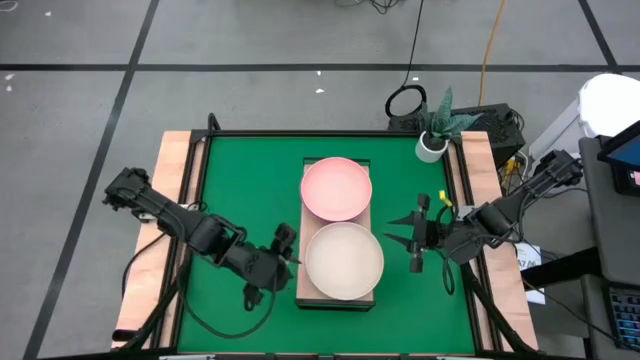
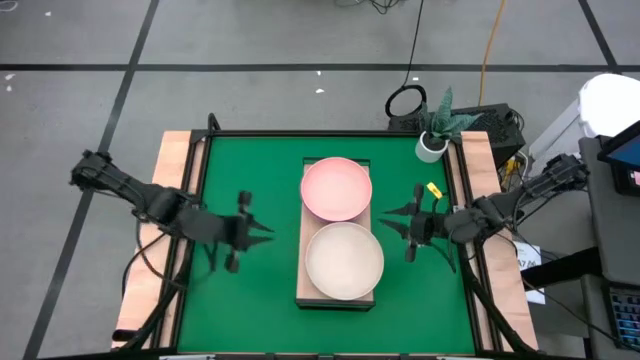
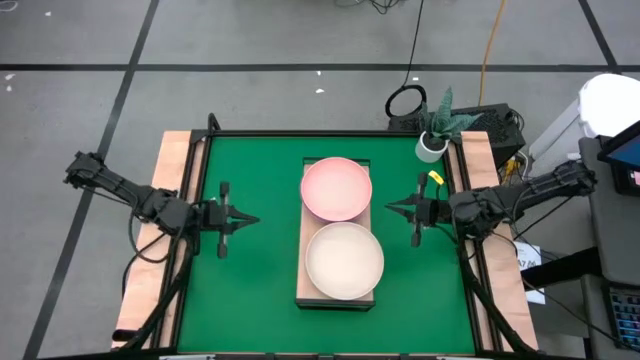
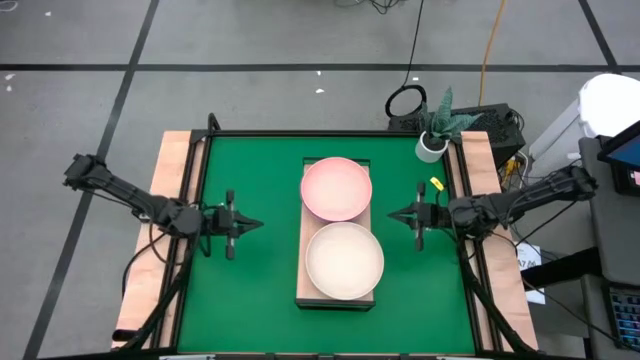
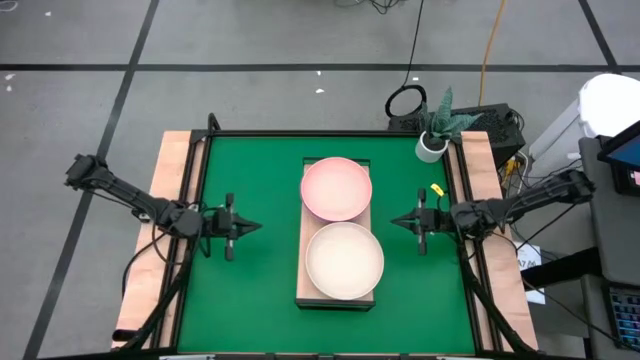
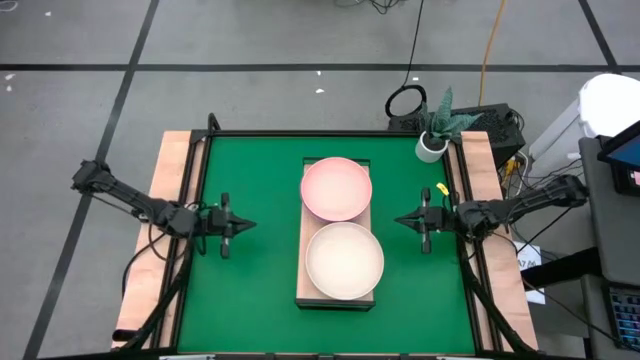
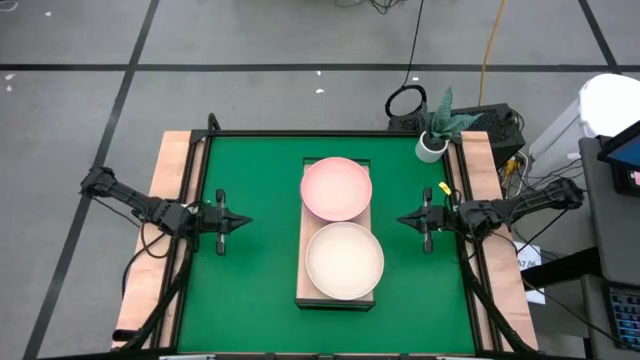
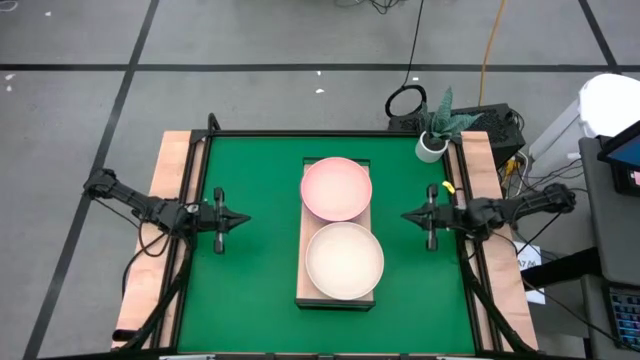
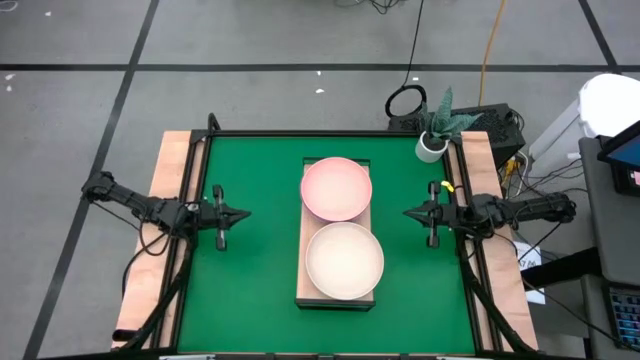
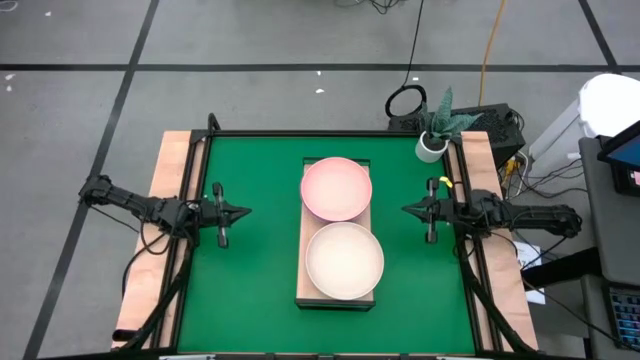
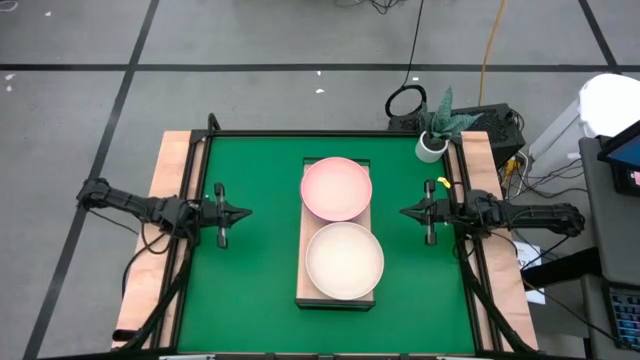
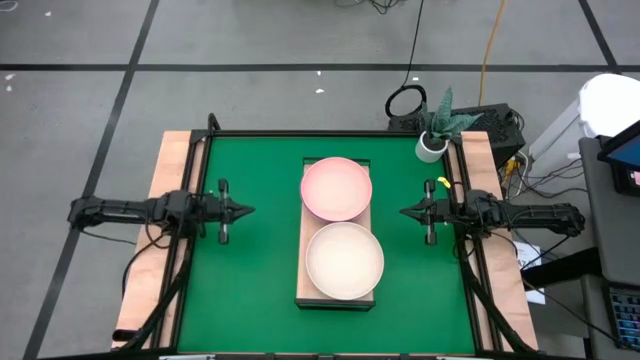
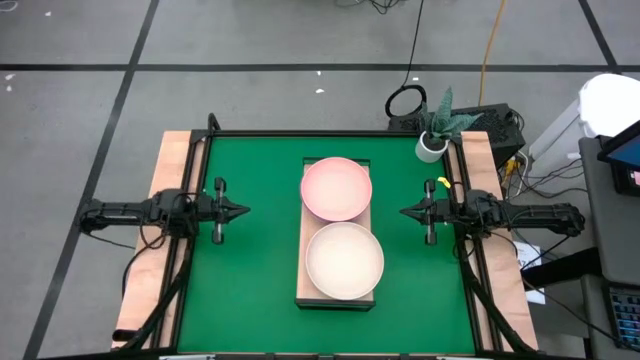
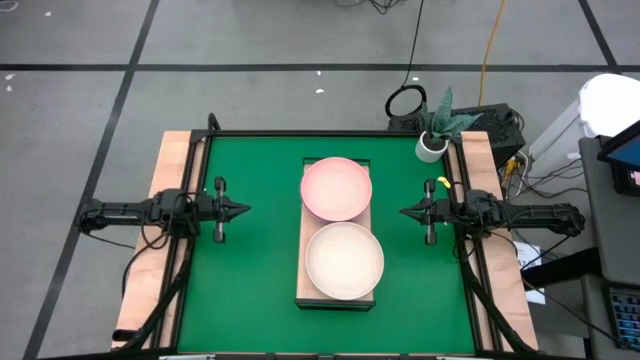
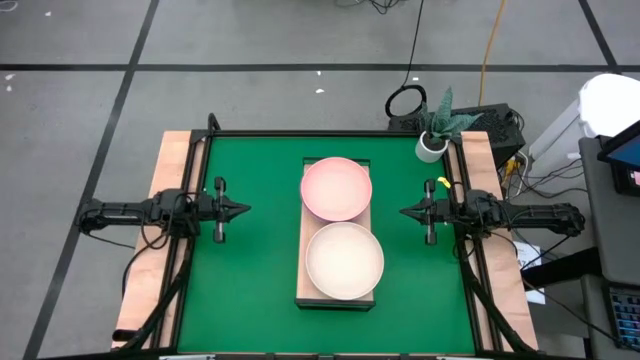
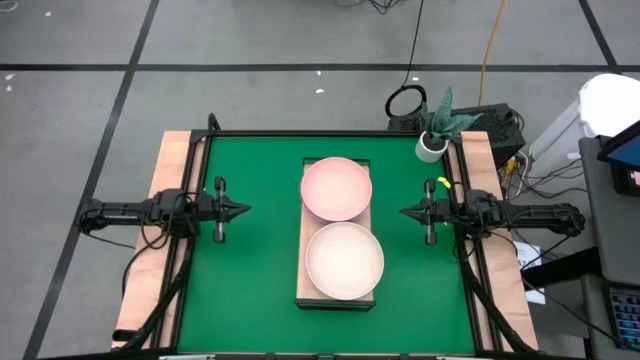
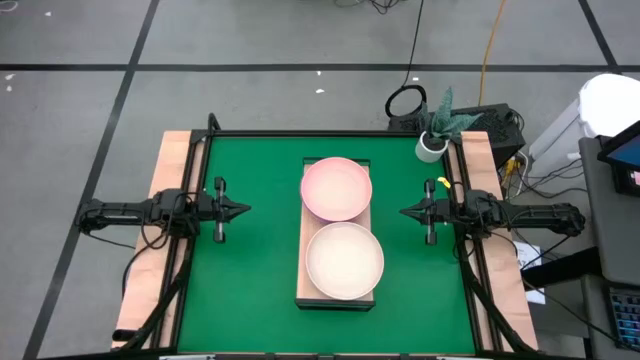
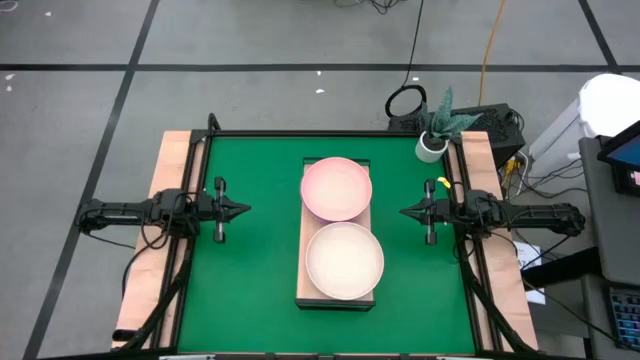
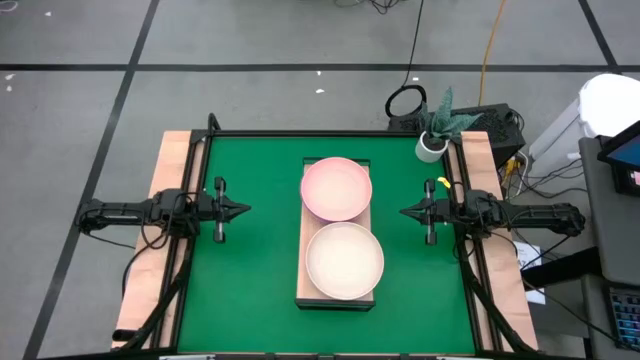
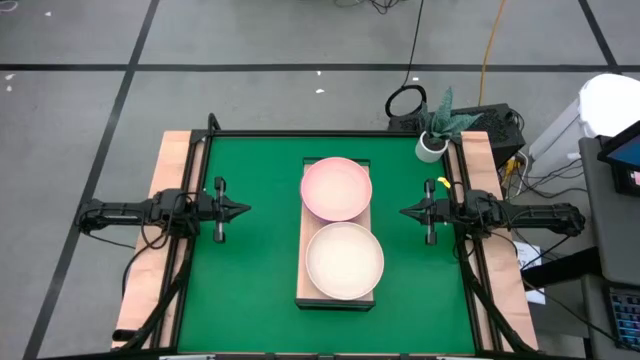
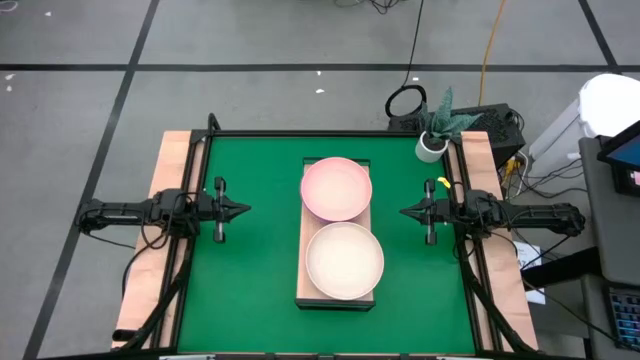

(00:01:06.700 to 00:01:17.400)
Task: Place and stack plates onto a shelf
Return to Home Position

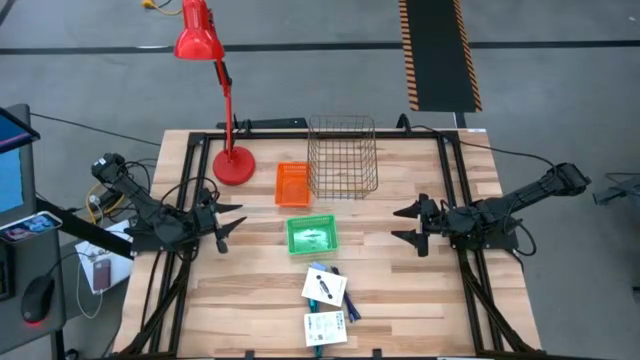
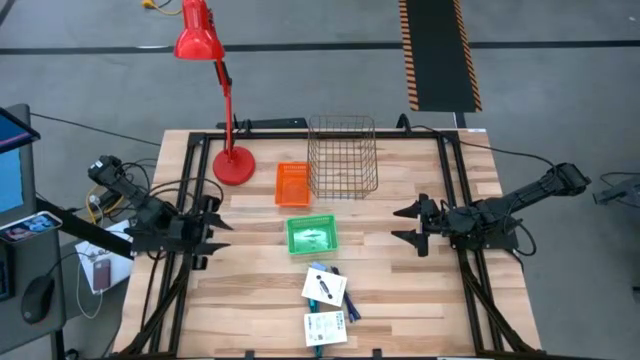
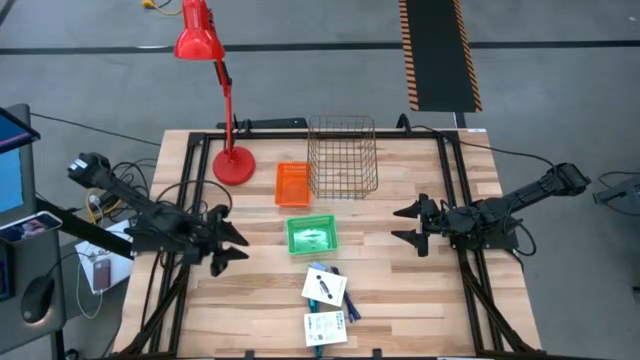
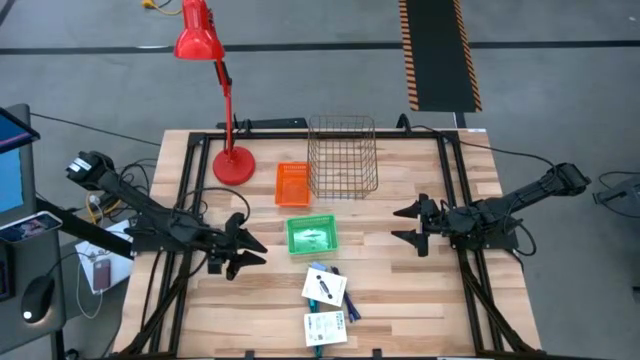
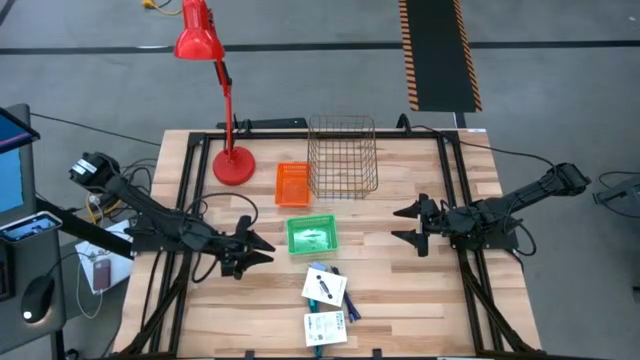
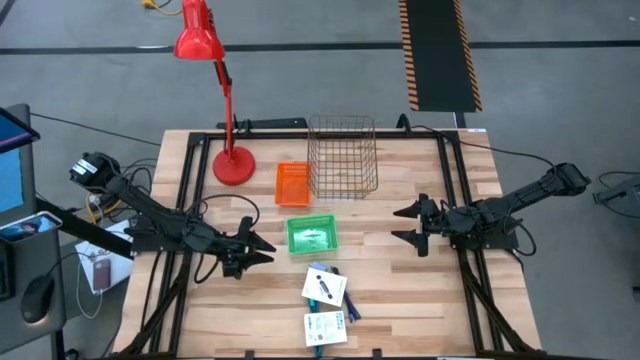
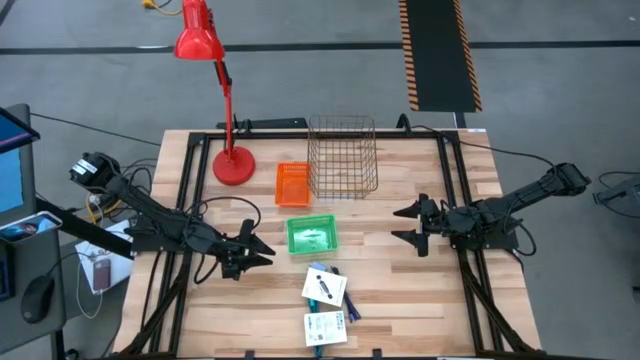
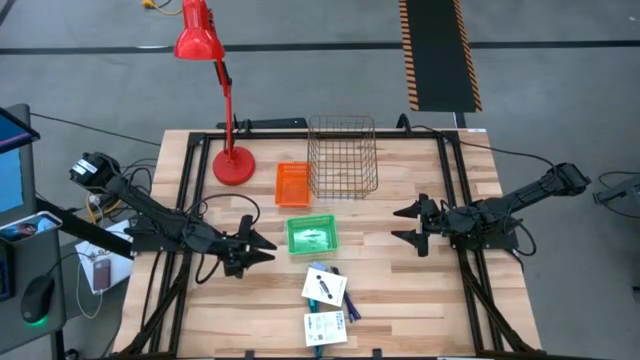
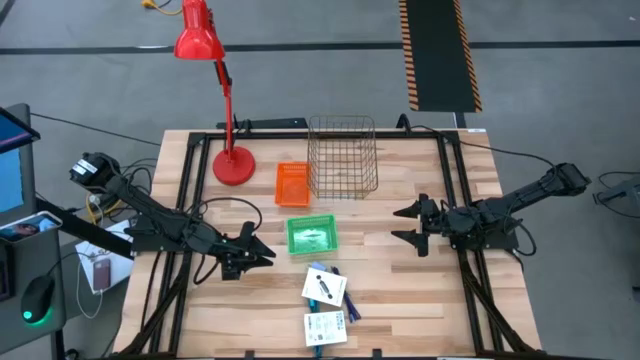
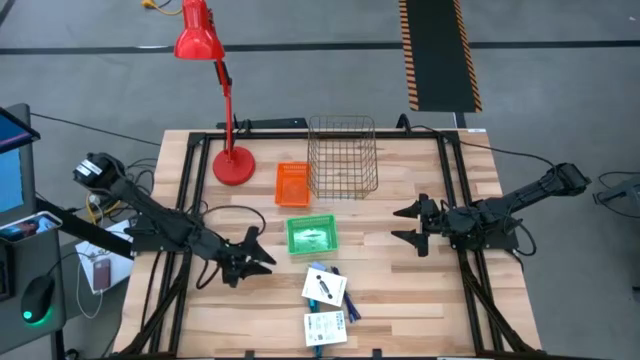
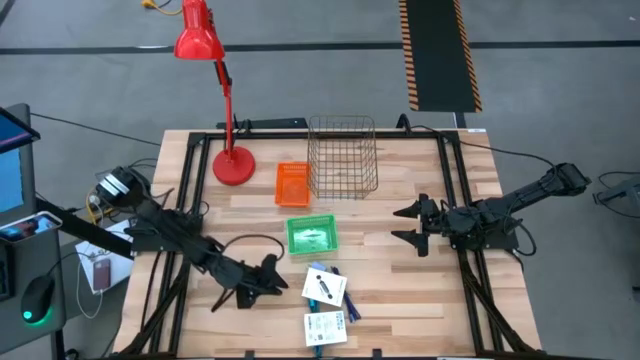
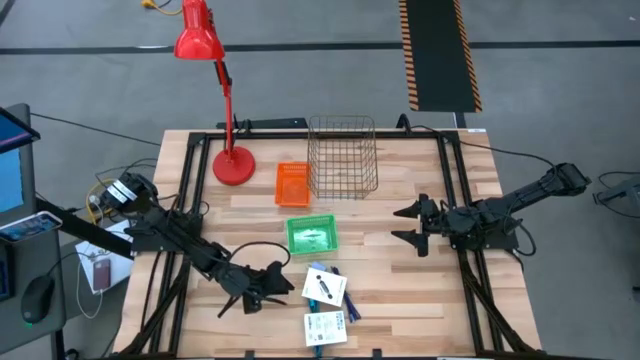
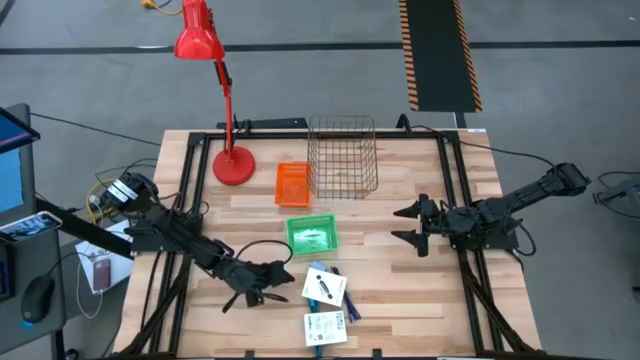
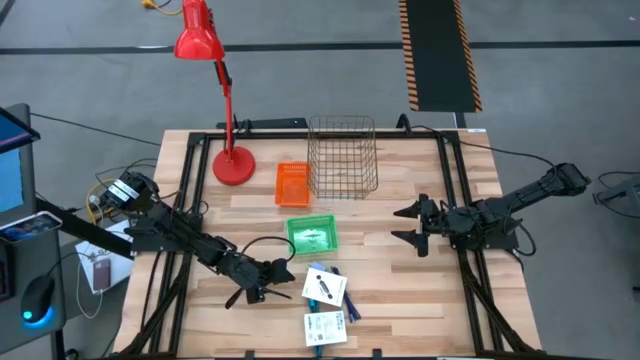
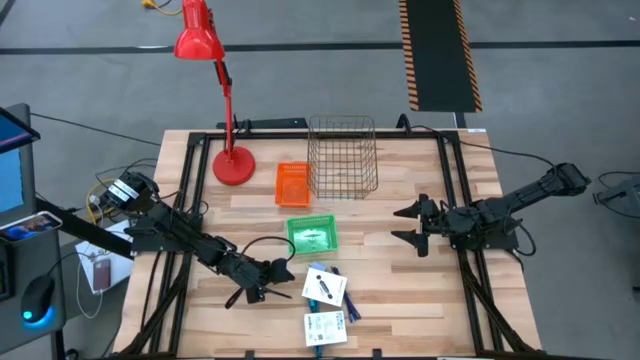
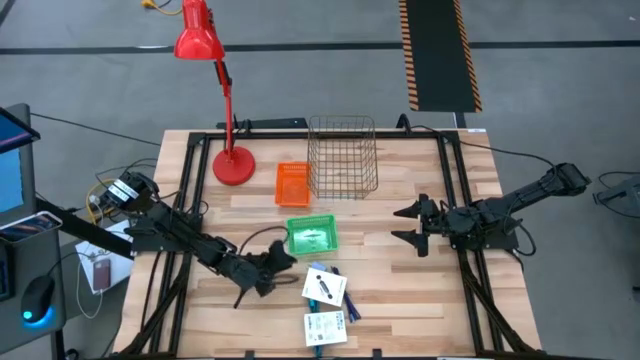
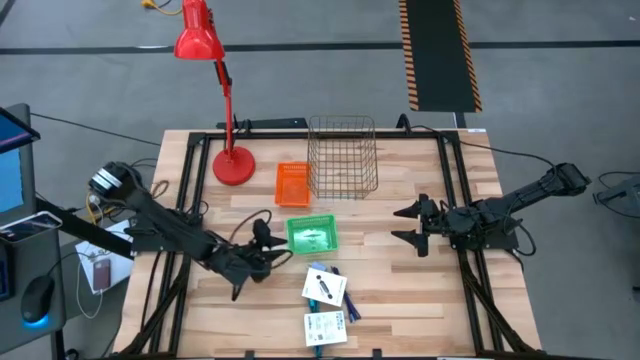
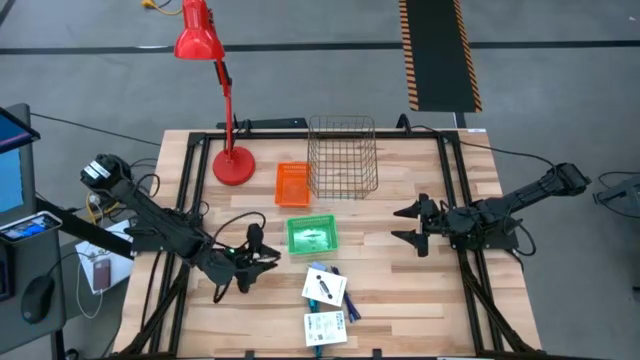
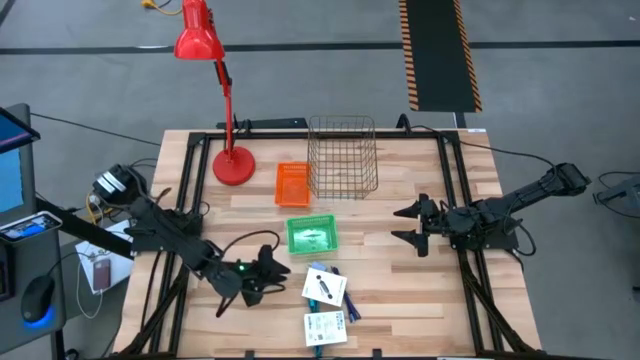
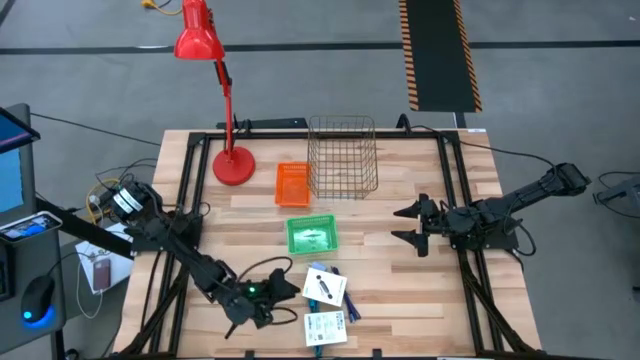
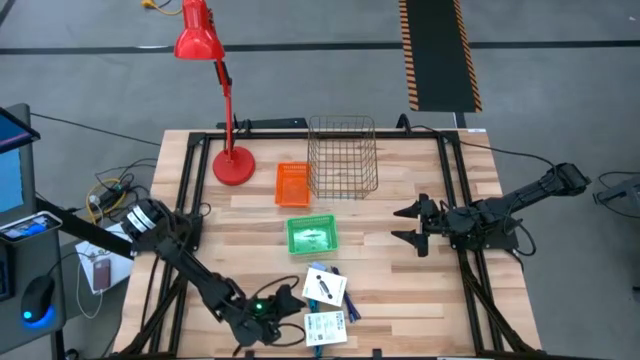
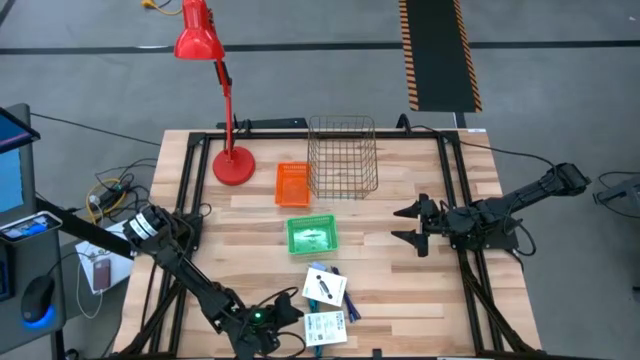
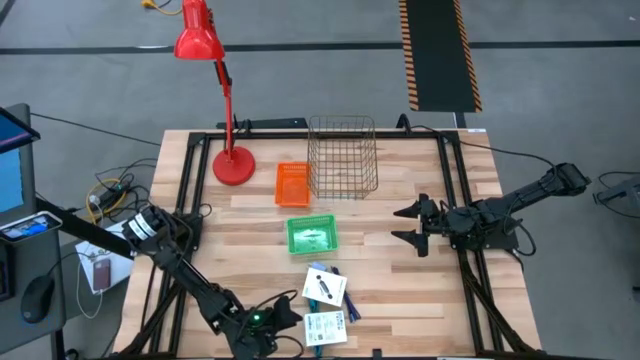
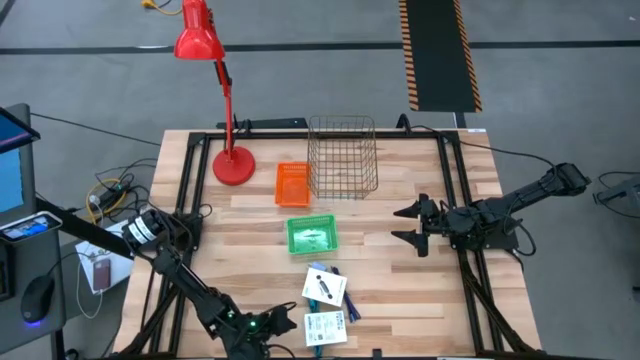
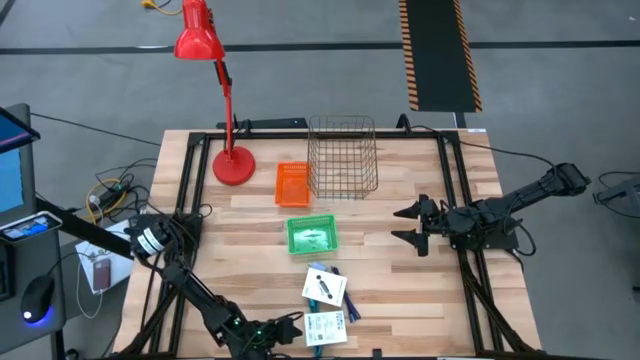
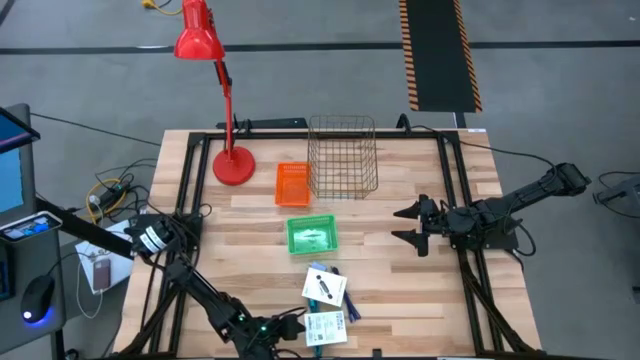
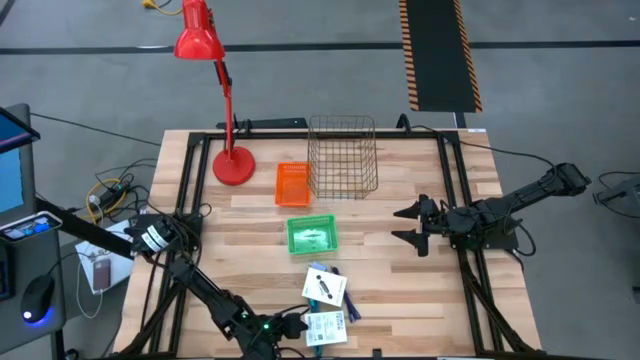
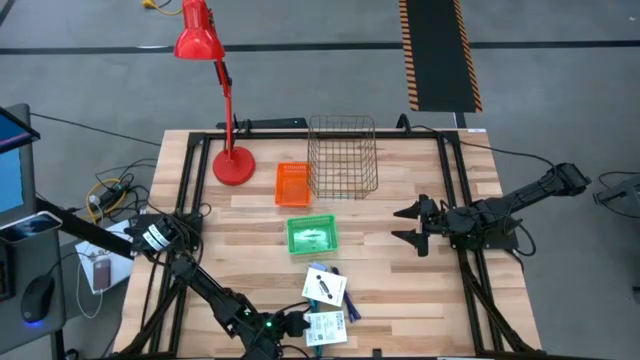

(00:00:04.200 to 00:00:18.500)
Task: Pick and place items into bin
Put the top card reader box into the green bin
